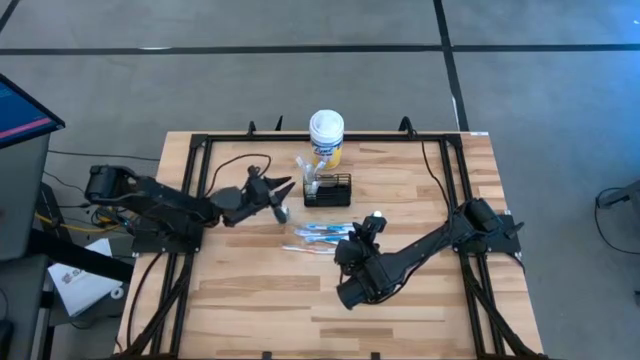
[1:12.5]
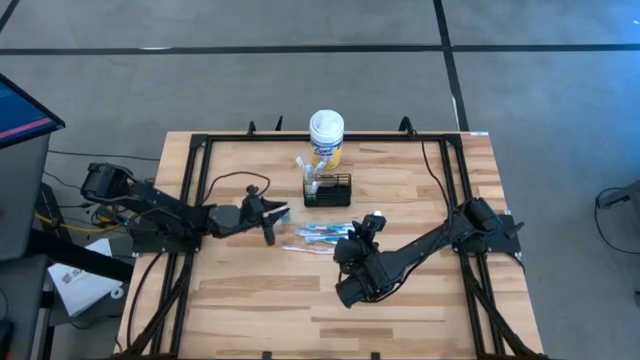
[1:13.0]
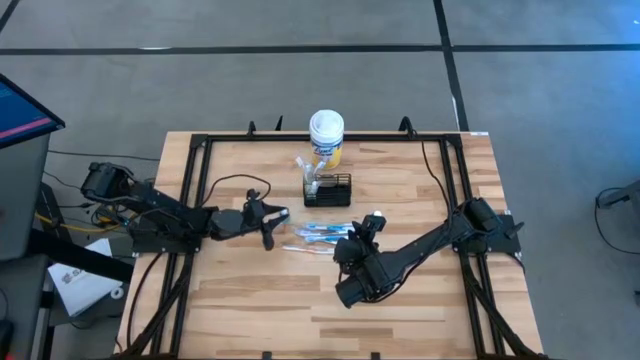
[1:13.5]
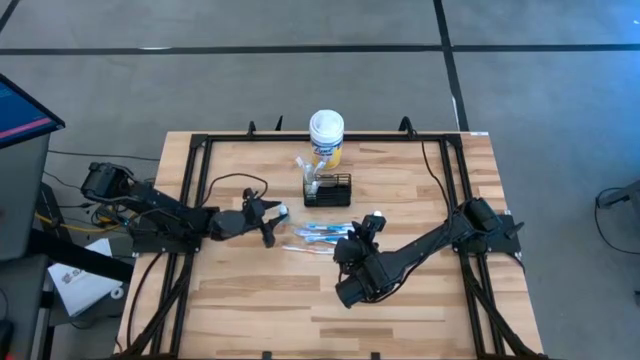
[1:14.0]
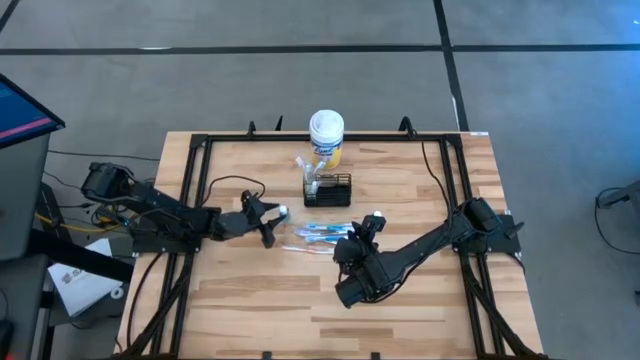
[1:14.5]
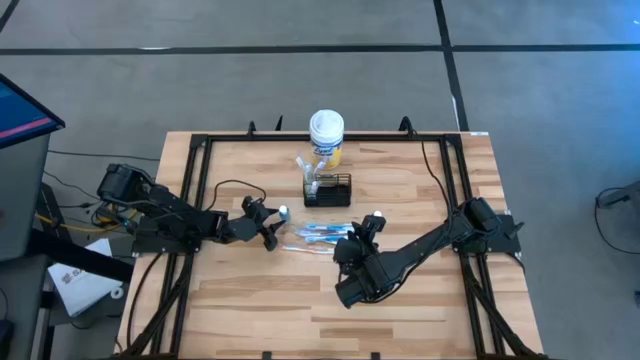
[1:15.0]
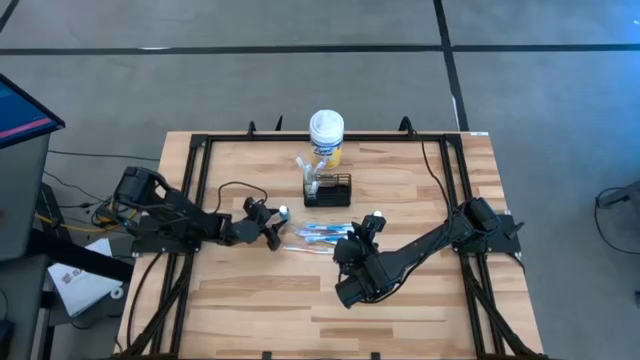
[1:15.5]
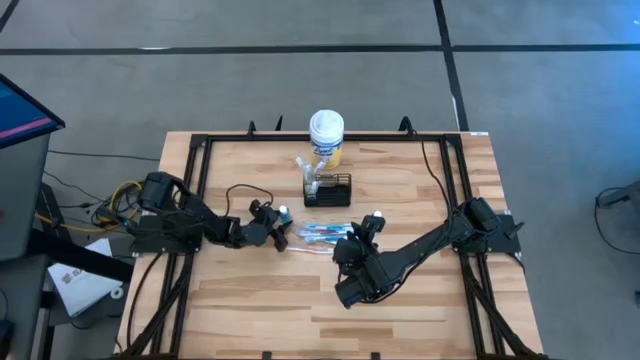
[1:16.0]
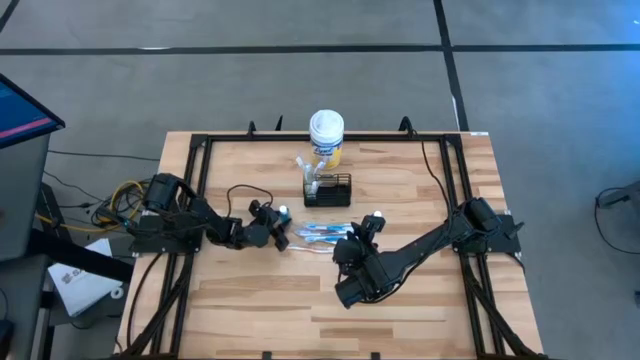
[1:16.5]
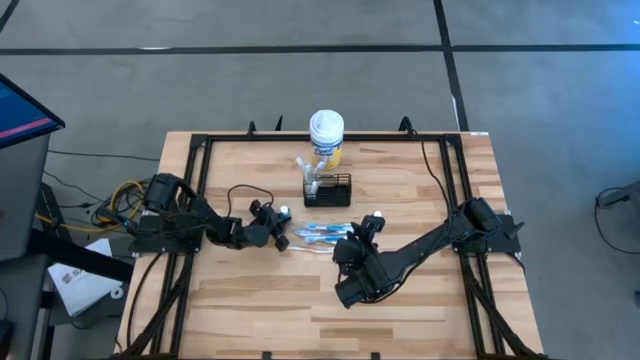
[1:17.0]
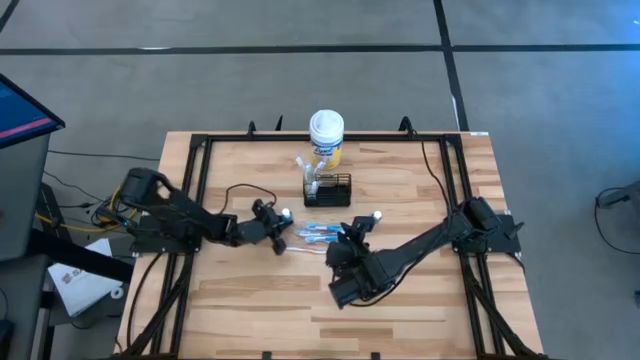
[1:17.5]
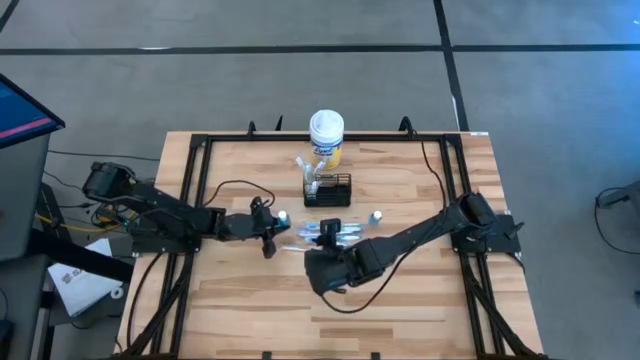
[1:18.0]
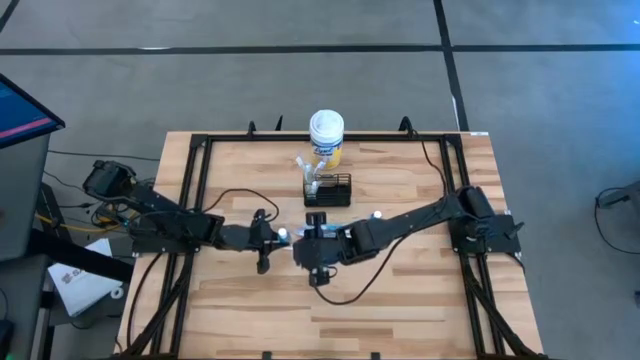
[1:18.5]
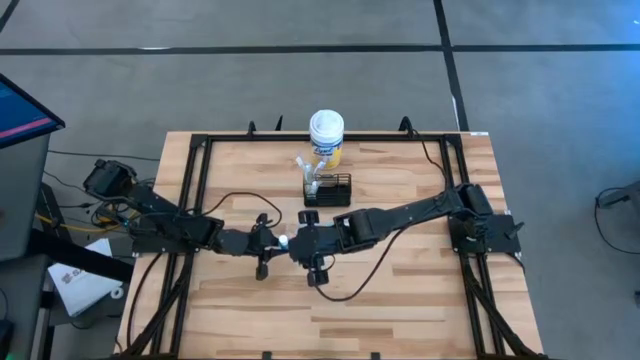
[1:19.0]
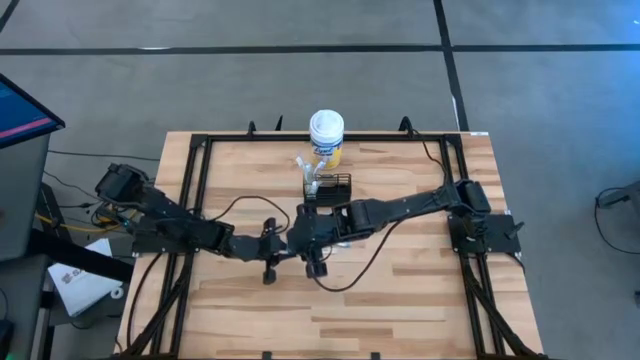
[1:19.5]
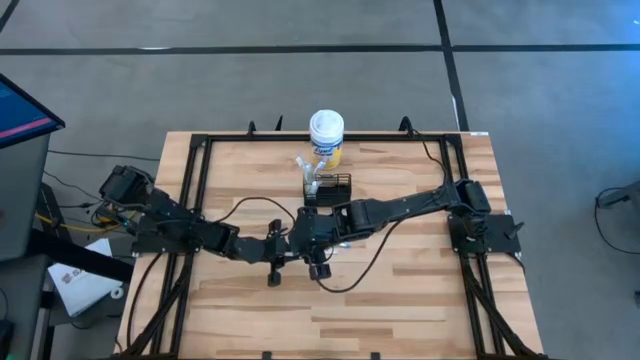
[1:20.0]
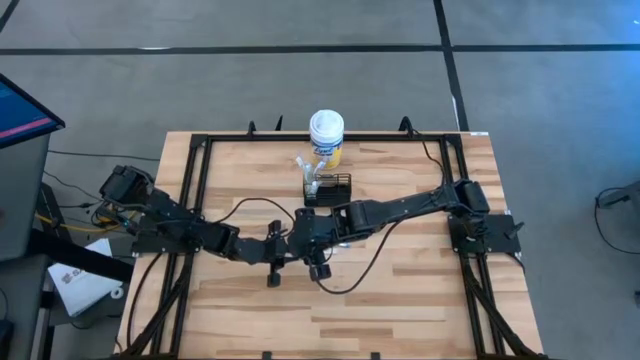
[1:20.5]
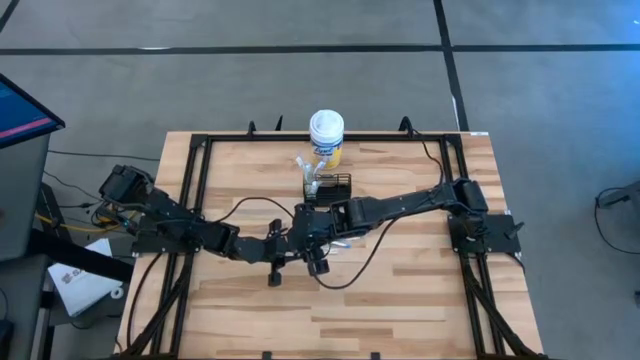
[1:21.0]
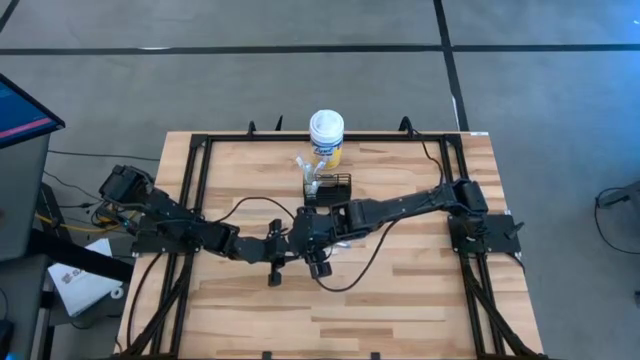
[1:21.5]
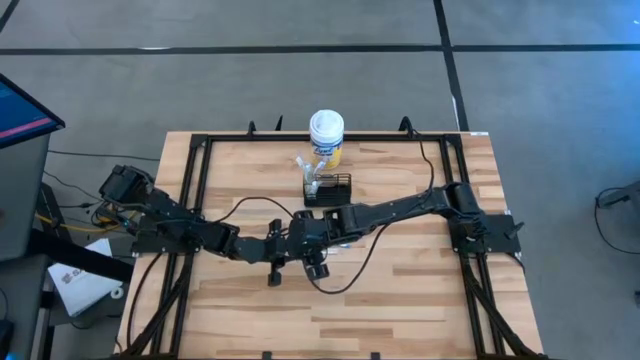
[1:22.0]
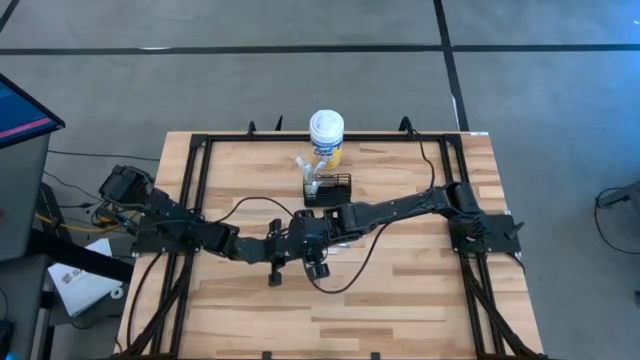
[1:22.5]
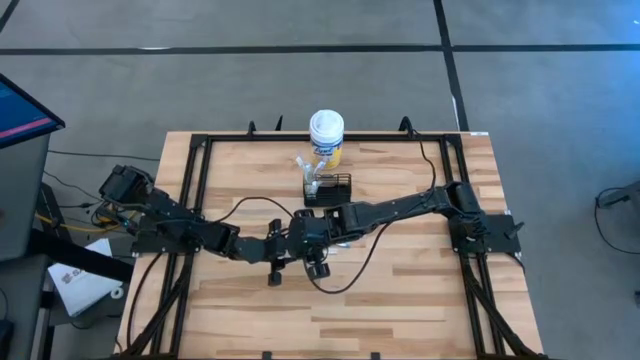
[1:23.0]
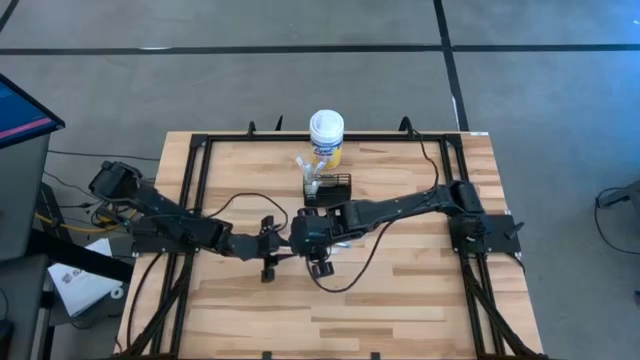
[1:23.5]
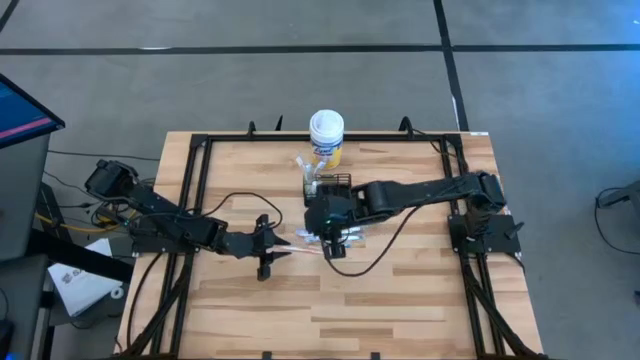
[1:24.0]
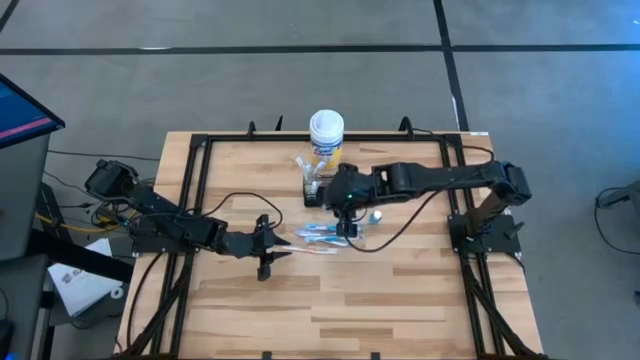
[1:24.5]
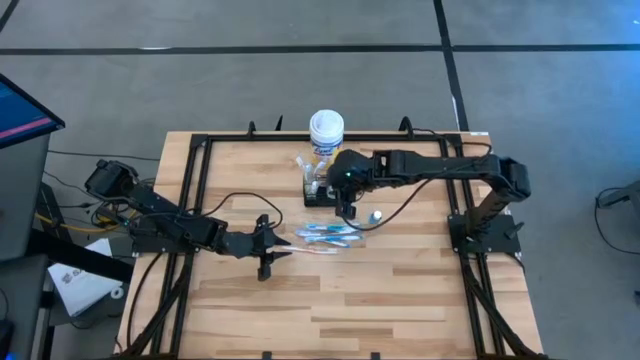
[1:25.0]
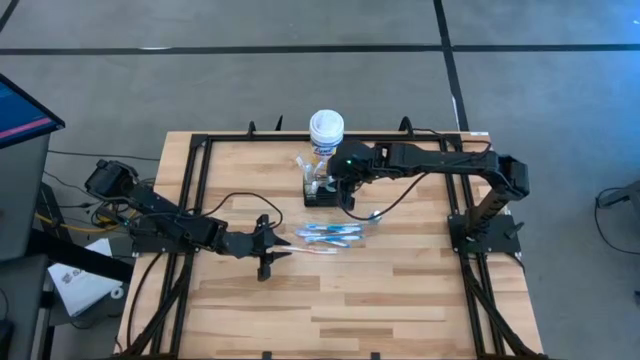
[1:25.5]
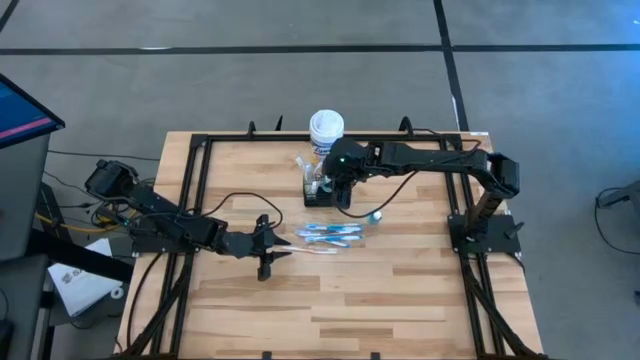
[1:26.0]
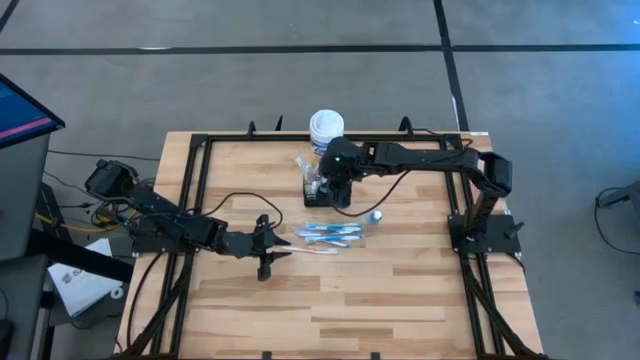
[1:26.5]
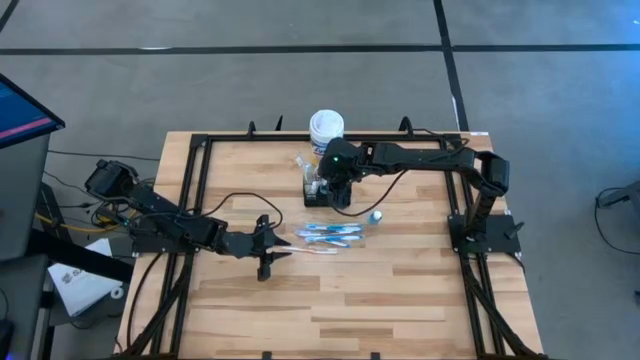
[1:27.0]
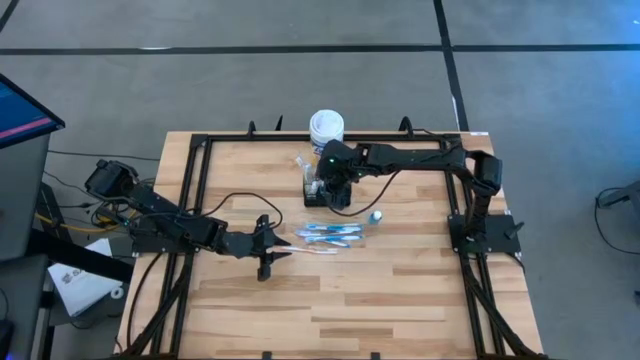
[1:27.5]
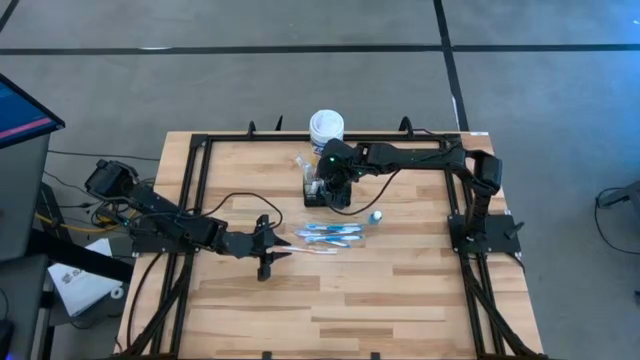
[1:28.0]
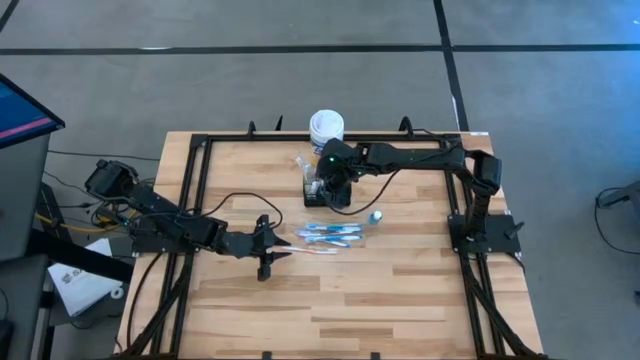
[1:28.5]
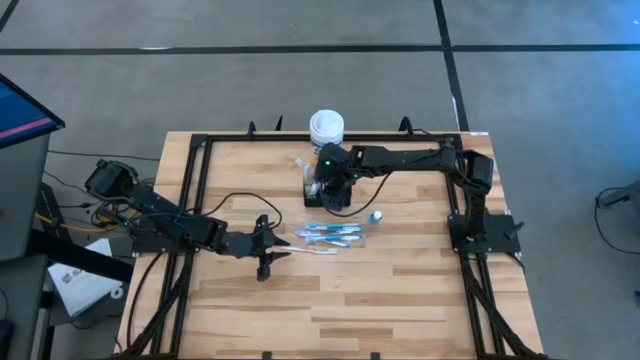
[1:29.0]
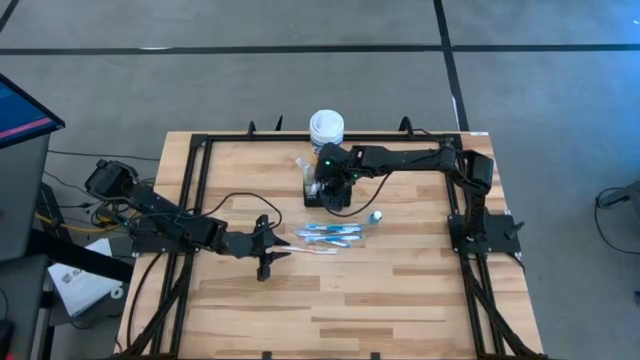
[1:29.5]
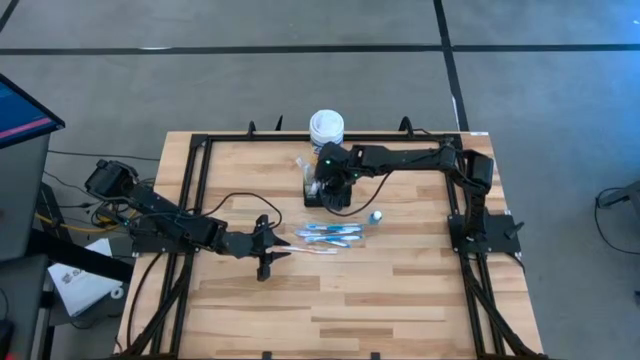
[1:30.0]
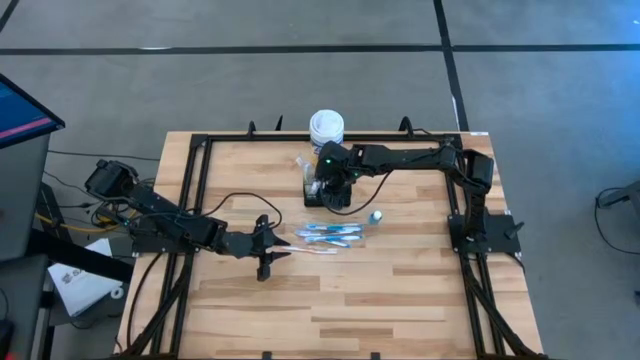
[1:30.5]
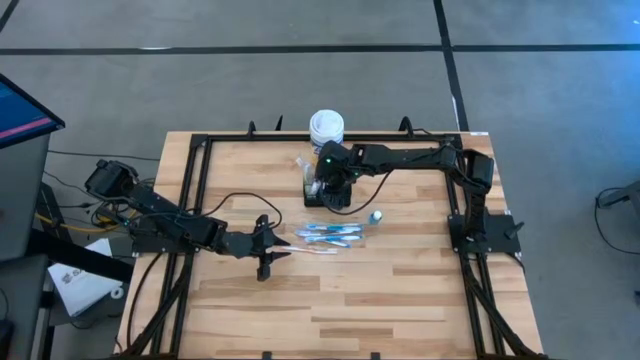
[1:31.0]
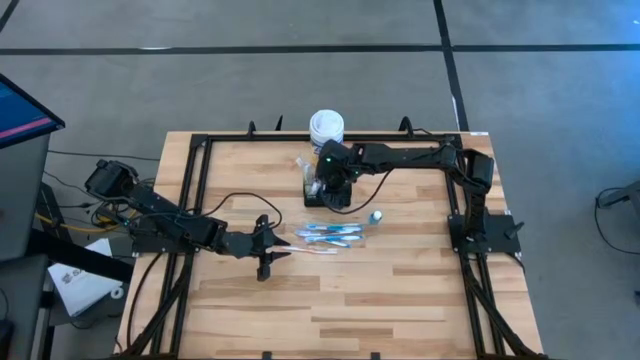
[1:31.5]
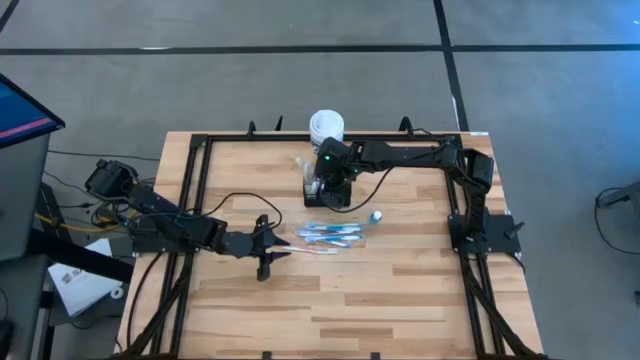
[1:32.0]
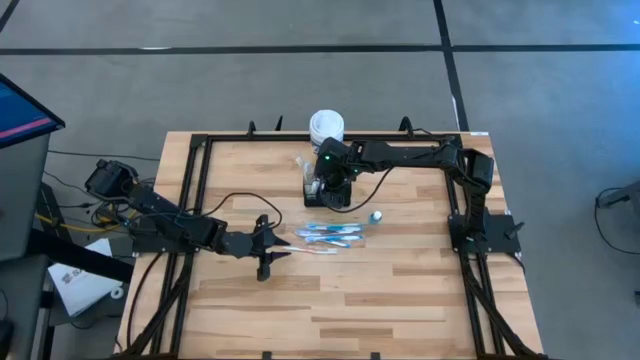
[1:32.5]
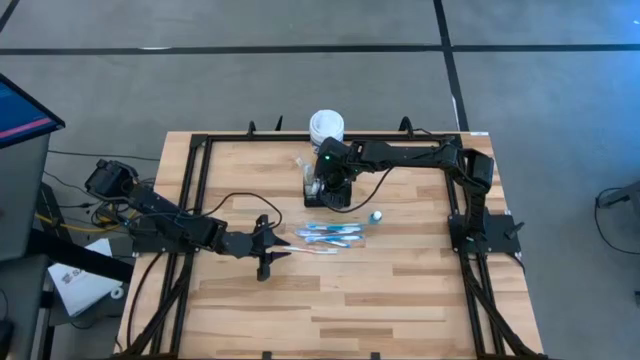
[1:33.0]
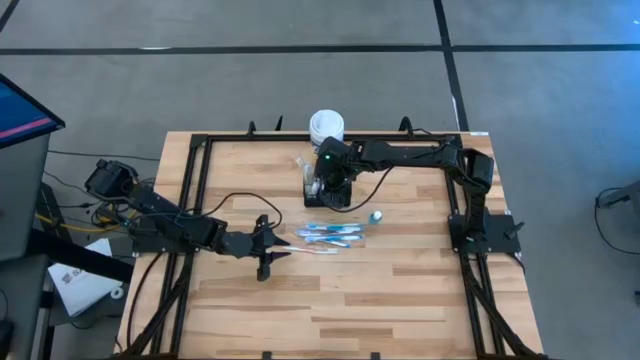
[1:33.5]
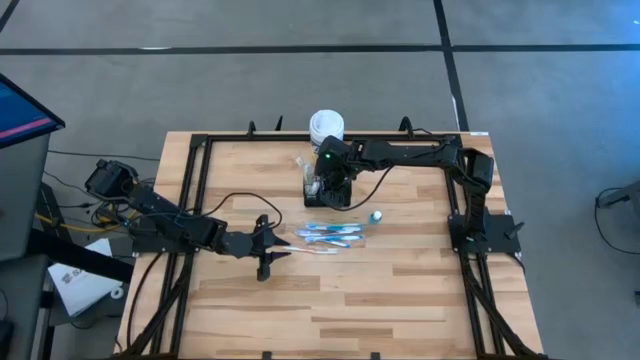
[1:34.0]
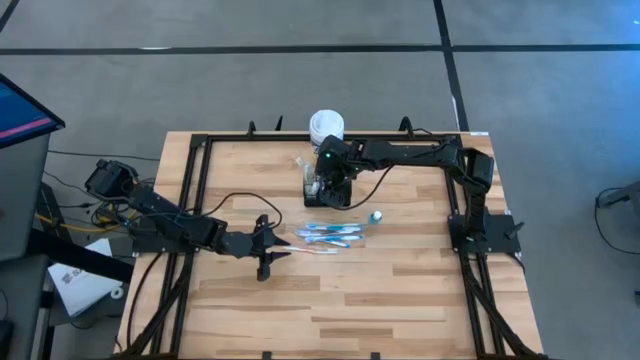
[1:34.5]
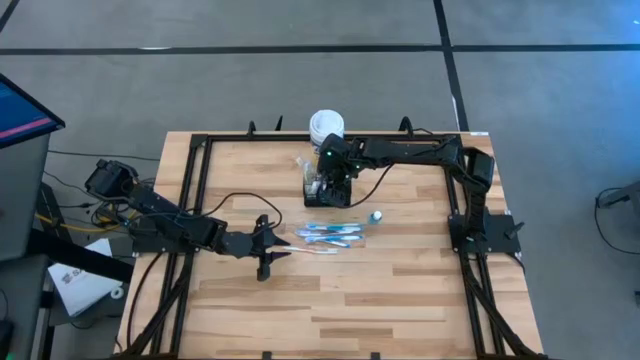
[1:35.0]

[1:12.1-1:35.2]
Task: Pick & Place toothbrushing station
Put the blue mouthwash bottle into the black wire organizer
